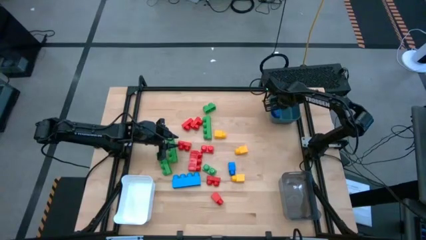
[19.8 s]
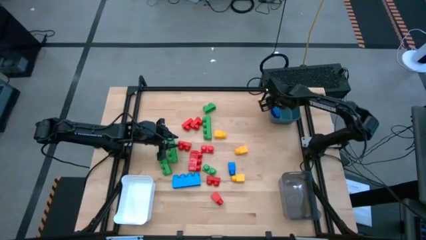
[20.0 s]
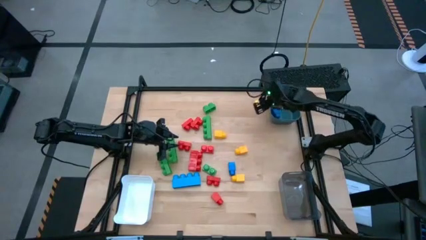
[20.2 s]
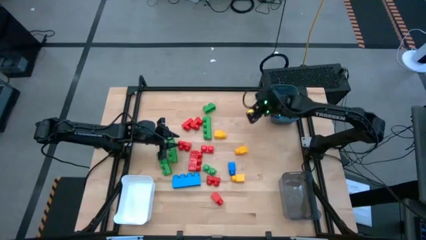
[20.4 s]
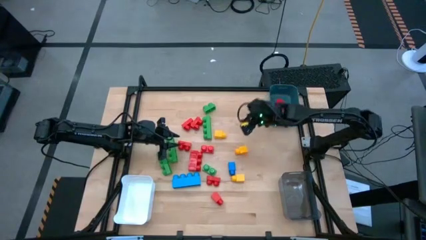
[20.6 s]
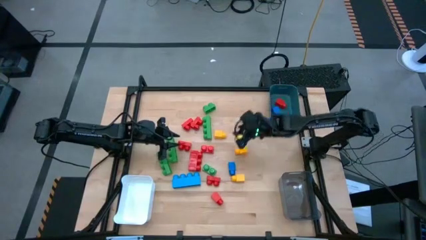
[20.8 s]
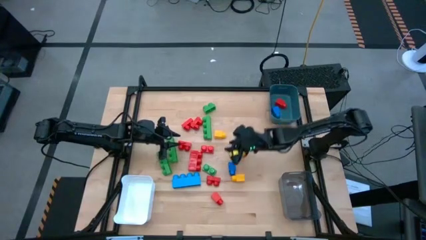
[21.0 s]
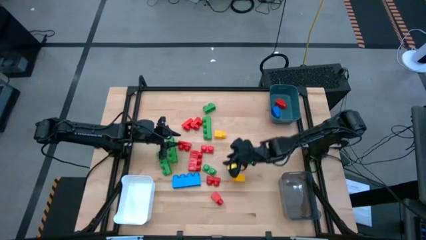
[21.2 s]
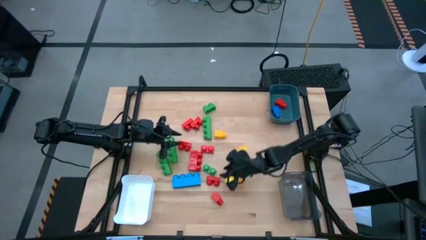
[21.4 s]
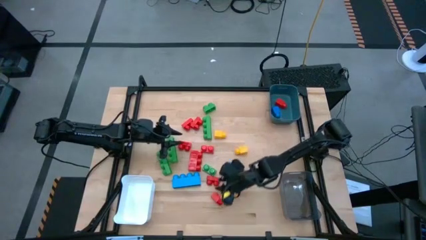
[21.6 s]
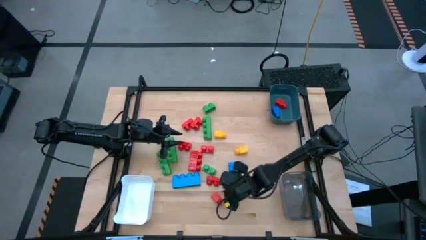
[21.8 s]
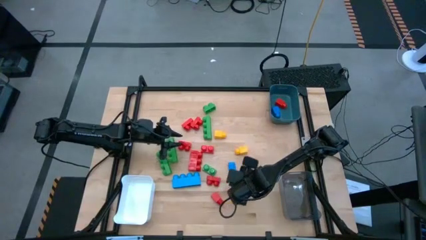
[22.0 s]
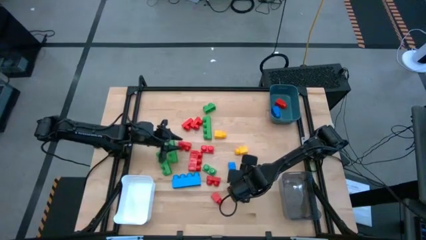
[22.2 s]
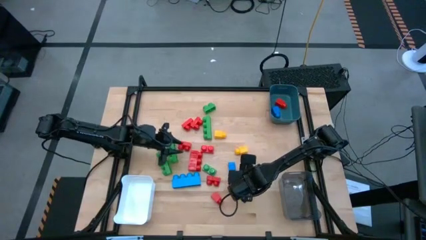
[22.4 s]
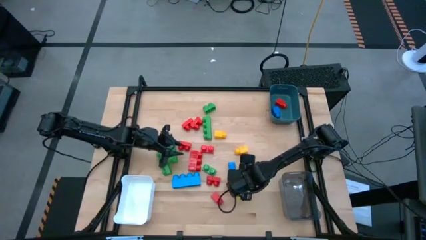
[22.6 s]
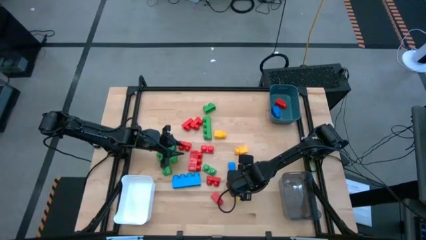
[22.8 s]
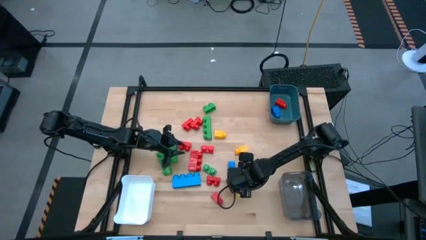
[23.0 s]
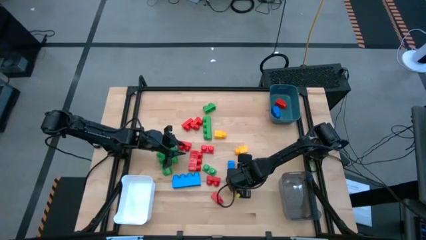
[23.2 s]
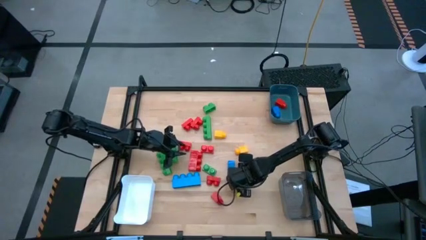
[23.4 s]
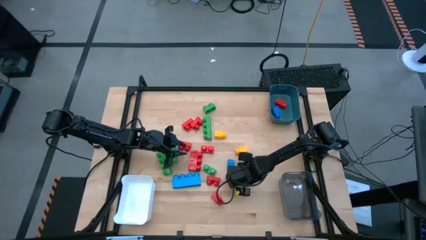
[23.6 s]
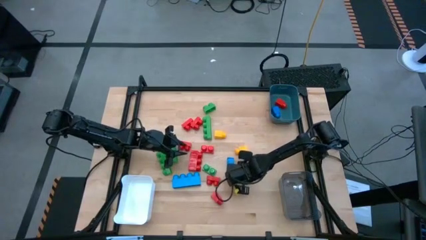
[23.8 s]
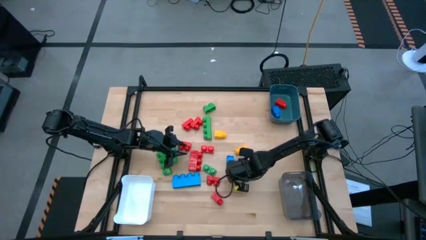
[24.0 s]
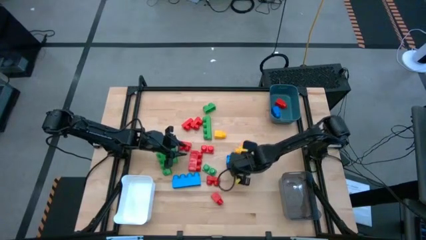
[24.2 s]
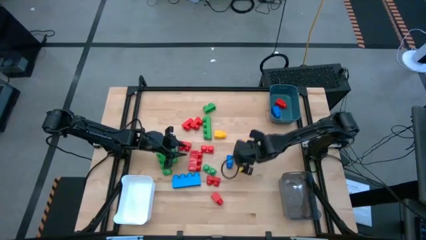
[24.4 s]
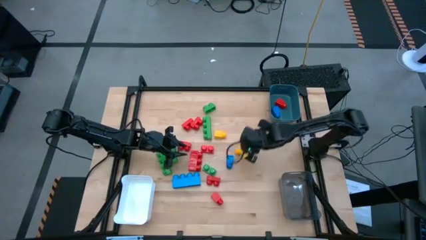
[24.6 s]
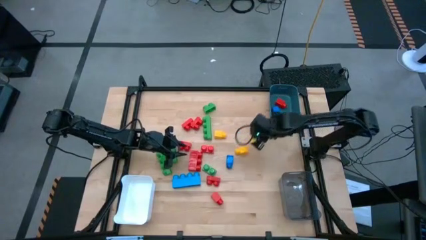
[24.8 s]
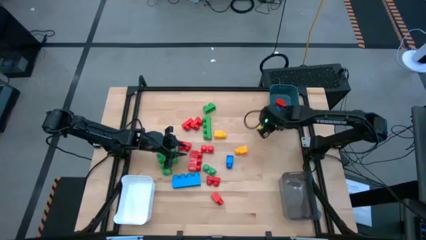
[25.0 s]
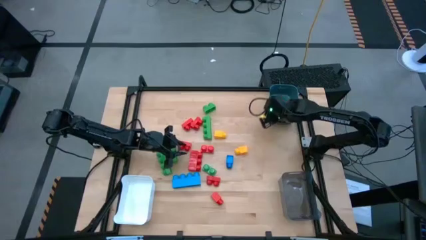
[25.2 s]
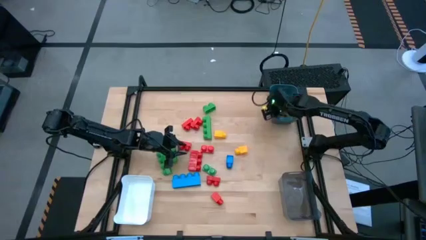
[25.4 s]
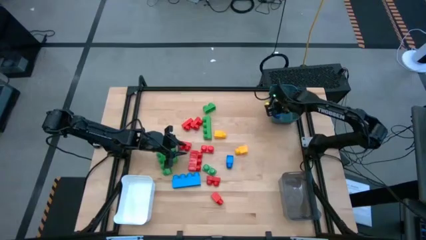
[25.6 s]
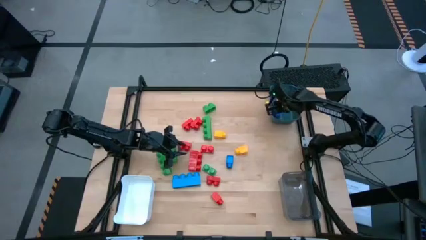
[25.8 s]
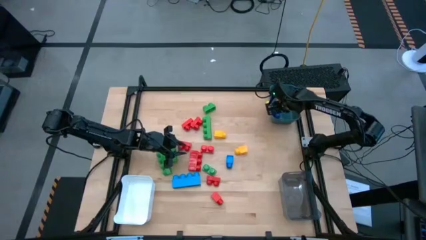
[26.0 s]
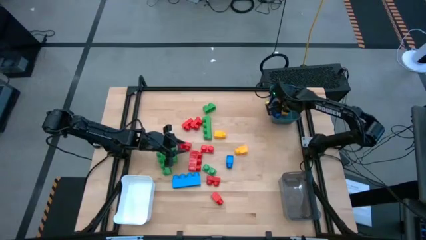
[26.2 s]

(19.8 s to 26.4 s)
Task: Sort blocks by size
Put the one stud yellow game piece into the blue bin

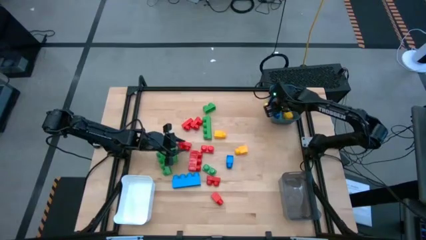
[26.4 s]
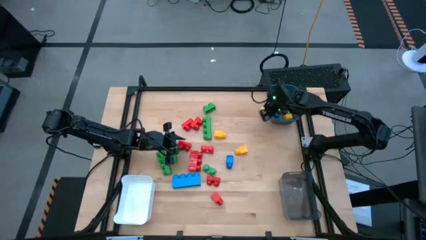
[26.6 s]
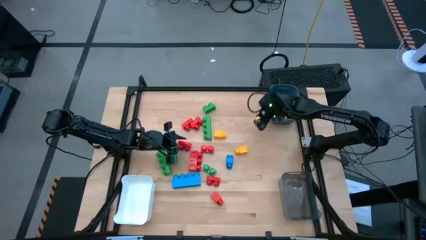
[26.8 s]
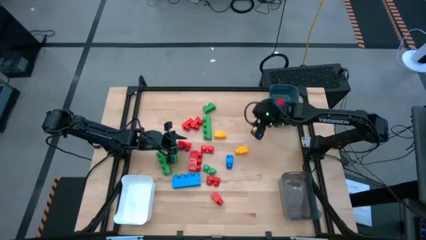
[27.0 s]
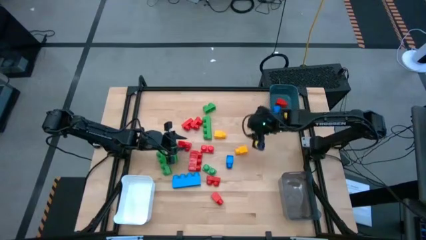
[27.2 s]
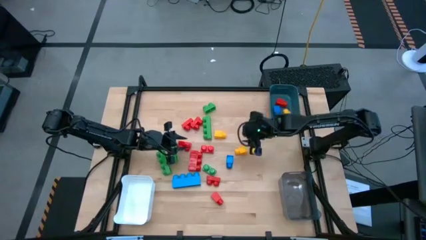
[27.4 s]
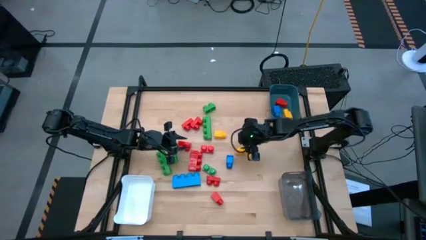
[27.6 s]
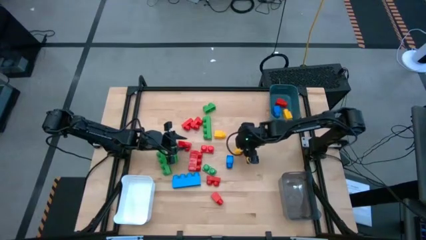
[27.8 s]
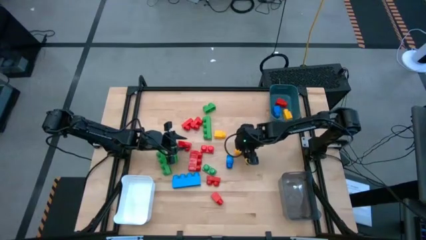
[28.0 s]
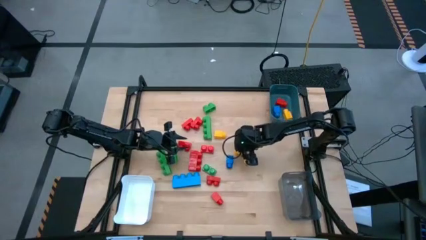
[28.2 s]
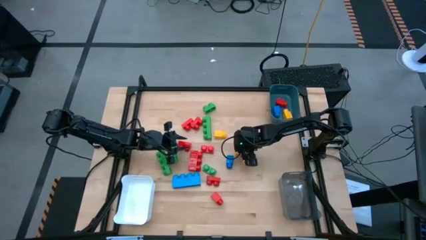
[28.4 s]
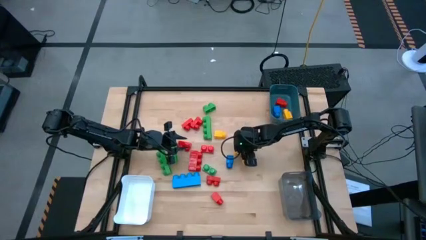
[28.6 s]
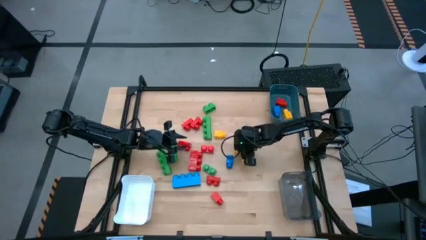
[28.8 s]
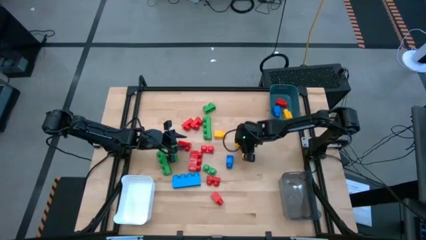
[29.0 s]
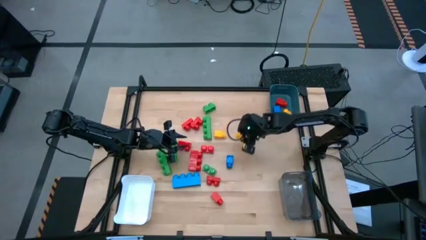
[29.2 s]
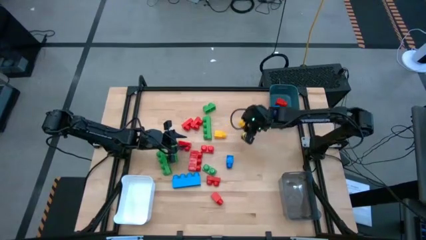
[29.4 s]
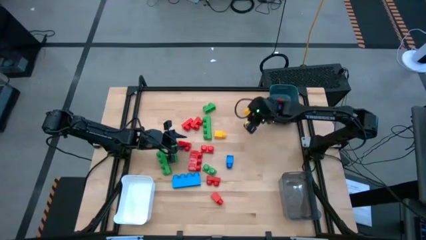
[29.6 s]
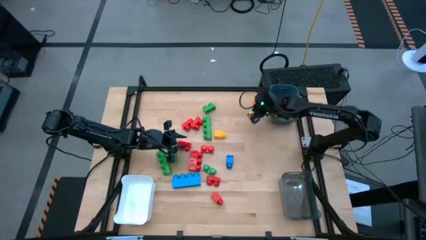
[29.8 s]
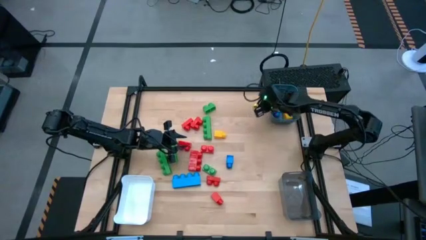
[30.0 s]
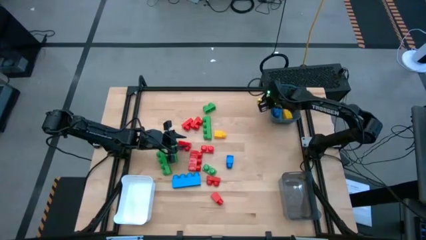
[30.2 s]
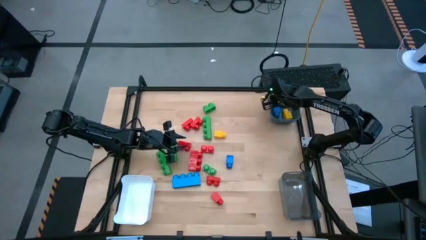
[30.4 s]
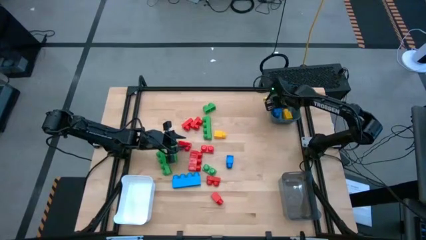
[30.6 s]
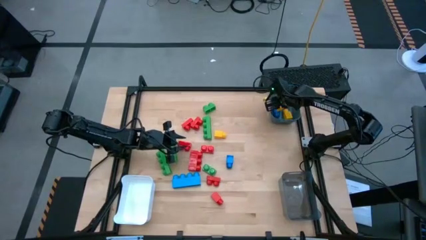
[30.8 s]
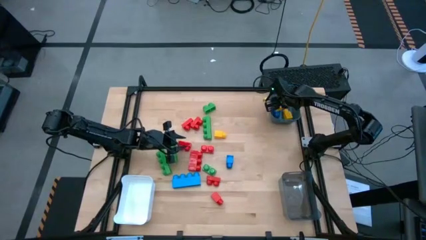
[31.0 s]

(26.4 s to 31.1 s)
Put the one stud yellow game piece into the blue bin

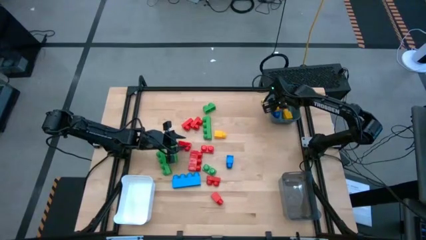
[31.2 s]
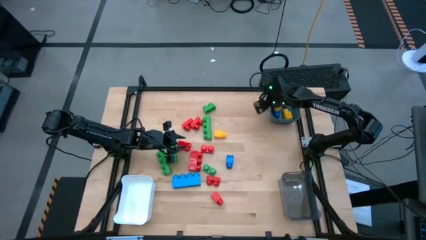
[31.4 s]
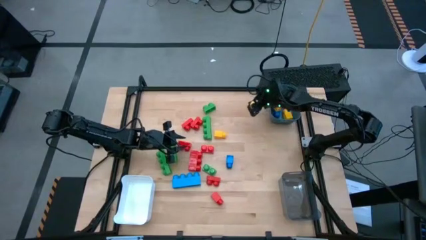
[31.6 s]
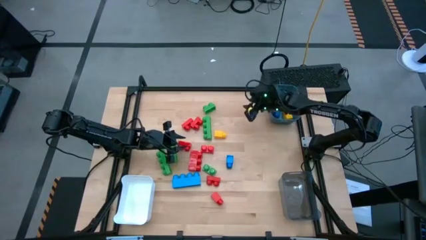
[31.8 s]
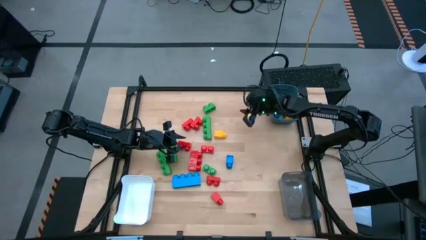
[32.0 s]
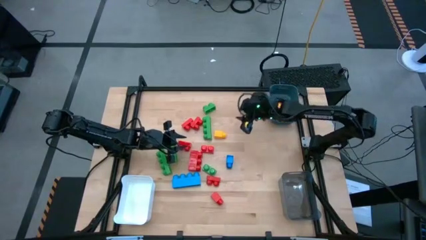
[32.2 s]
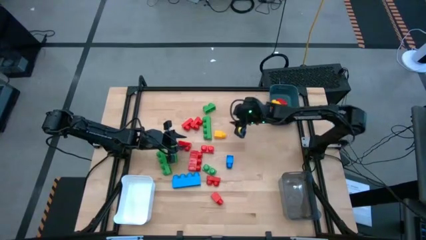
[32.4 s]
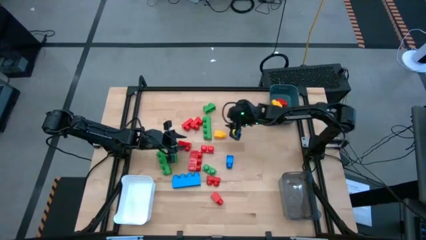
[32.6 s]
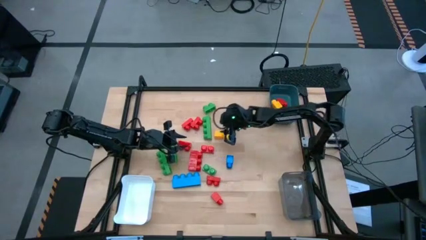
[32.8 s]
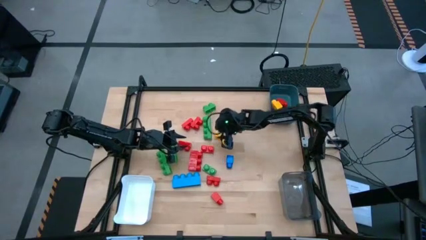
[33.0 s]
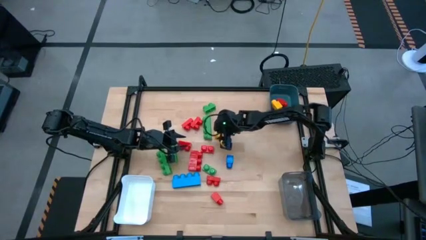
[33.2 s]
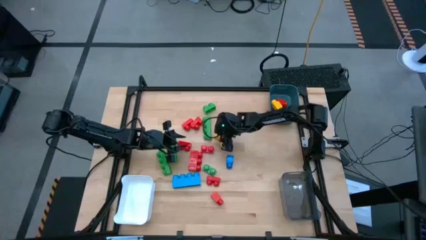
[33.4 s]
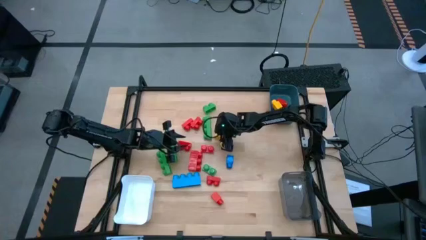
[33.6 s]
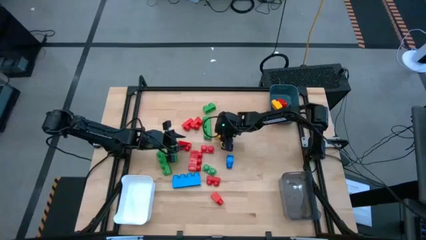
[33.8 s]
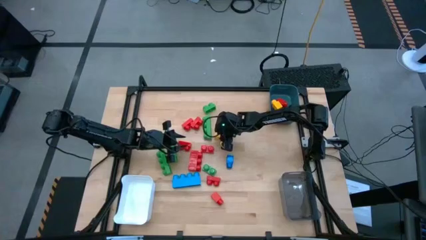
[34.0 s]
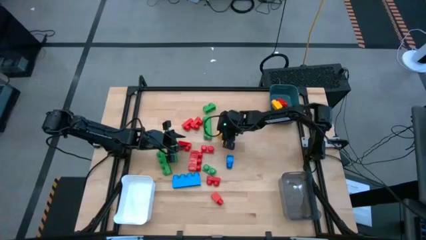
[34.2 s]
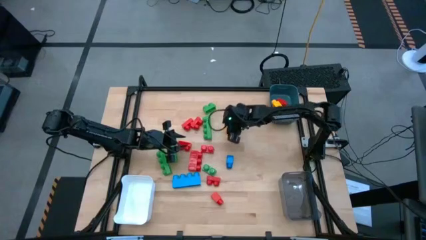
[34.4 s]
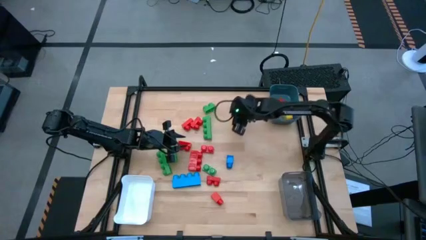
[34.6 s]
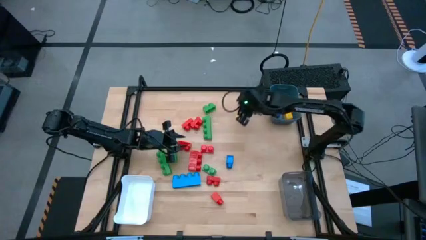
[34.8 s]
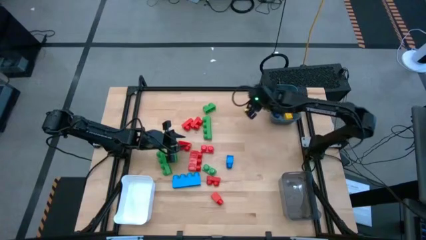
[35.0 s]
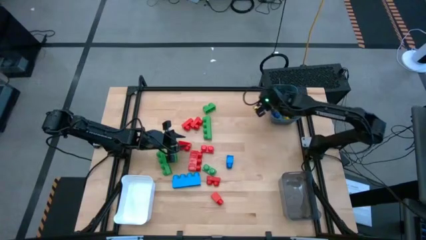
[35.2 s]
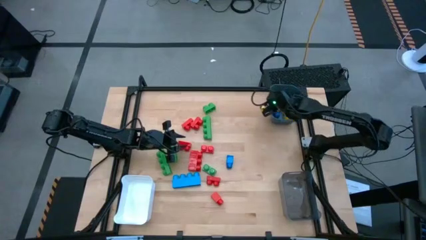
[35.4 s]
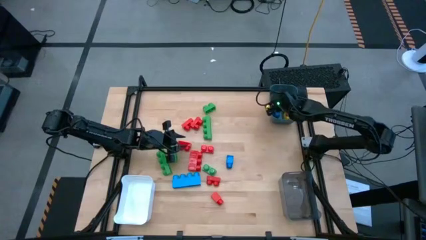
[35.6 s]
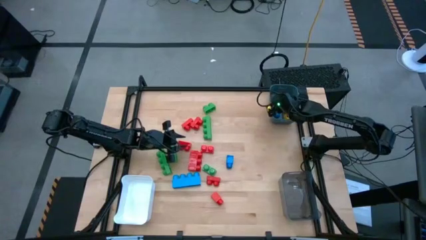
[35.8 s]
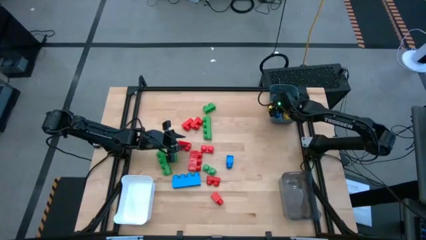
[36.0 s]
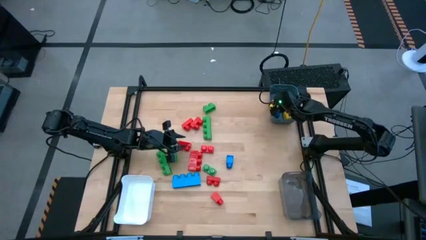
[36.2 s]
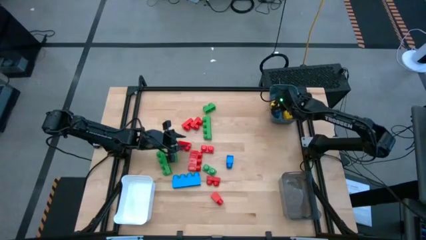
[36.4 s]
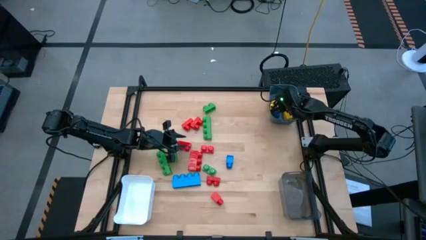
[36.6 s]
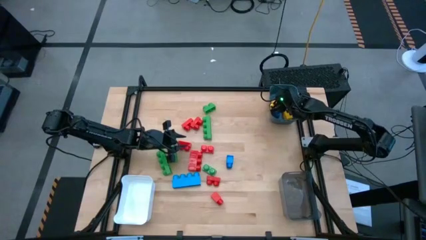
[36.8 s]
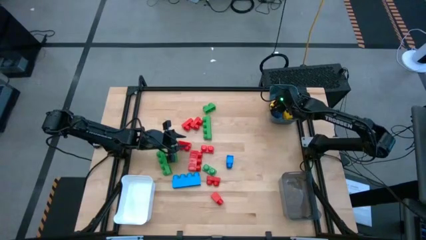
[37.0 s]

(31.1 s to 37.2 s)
Put the one stud yellow game piece into the blue bin
